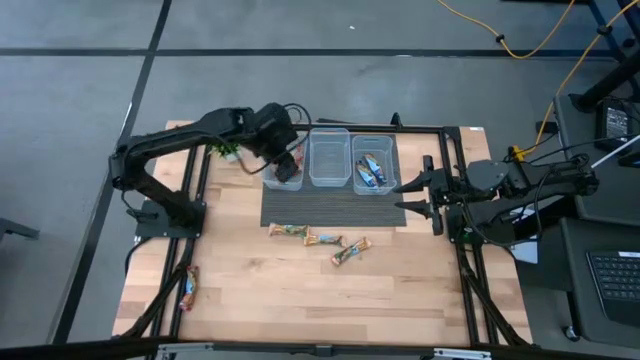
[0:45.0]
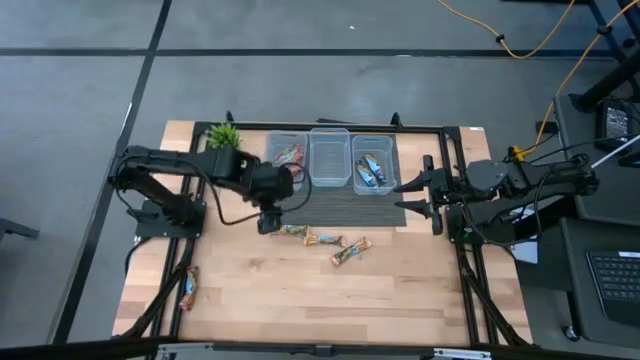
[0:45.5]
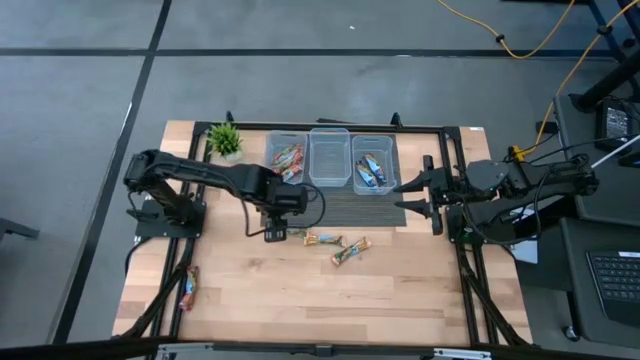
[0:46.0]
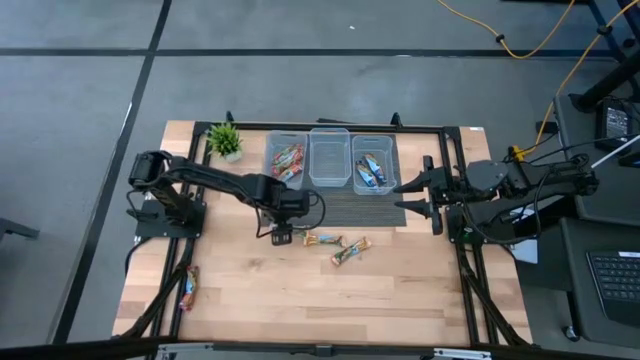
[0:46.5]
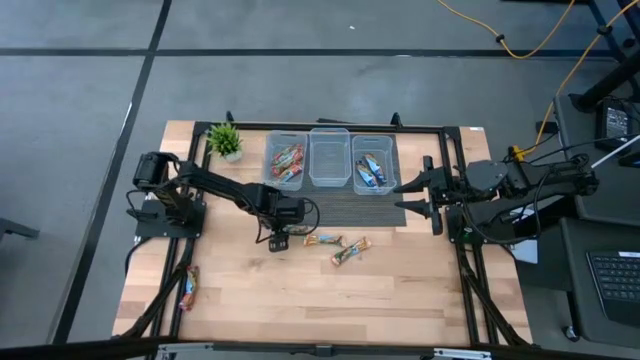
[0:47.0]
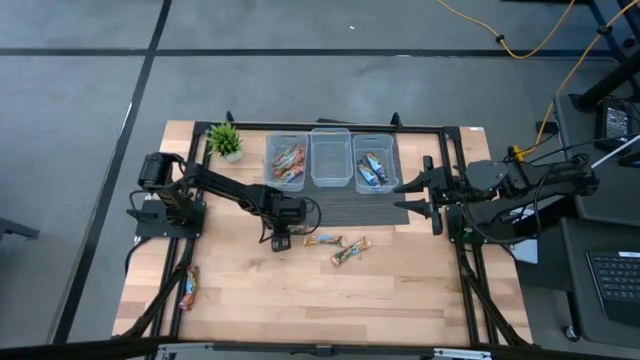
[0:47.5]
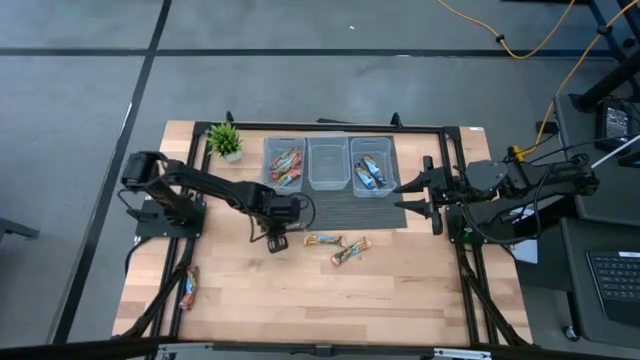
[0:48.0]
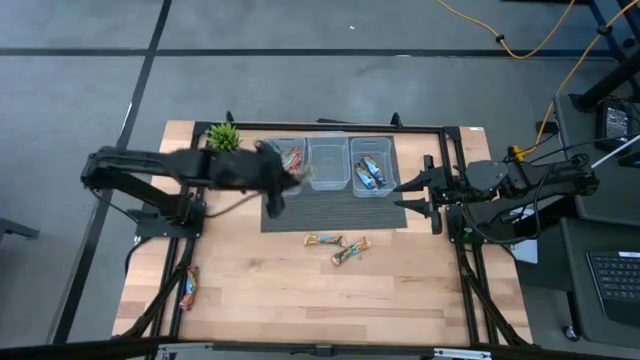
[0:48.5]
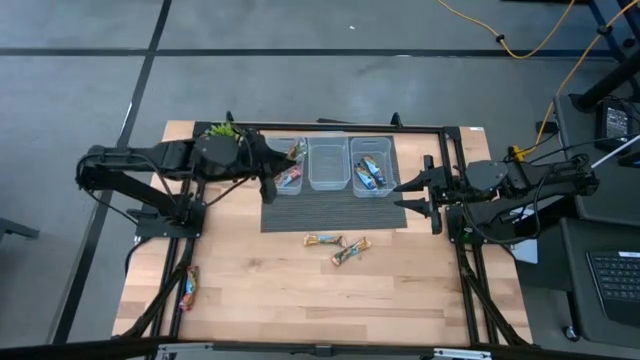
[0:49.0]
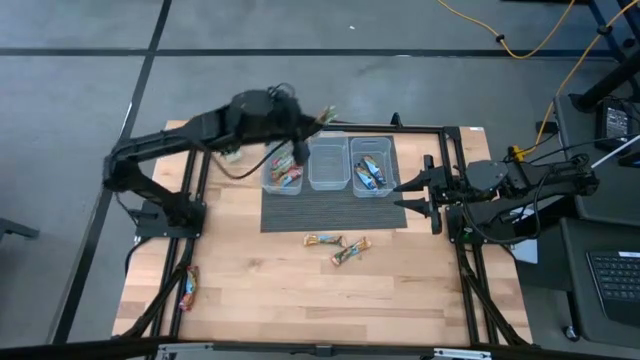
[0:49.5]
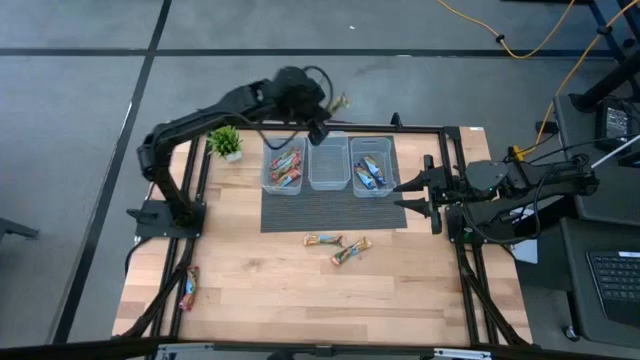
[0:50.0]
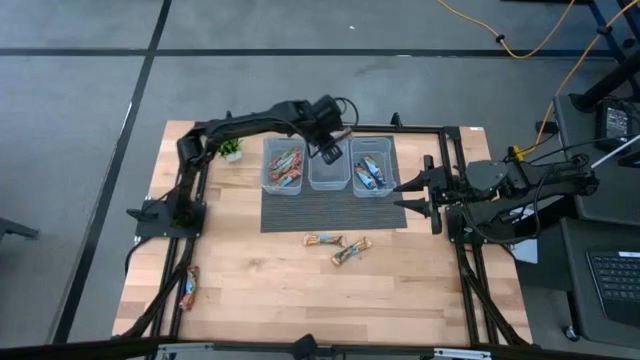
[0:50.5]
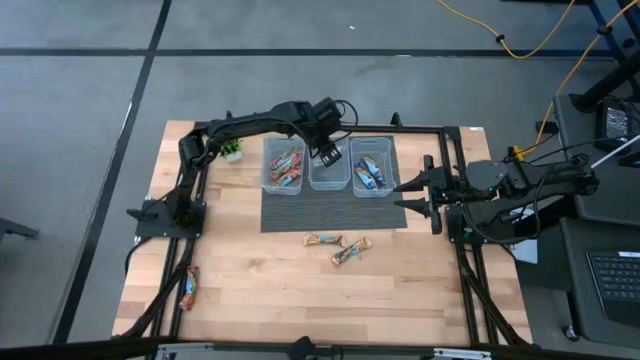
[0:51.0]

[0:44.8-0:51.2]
Task: Pick and place Granola Bars by type
Put the left orange into the middle transparent bin

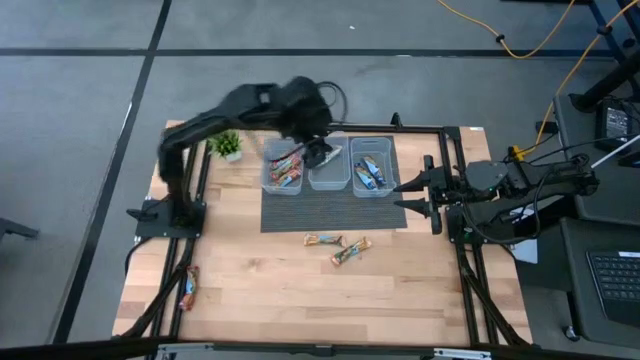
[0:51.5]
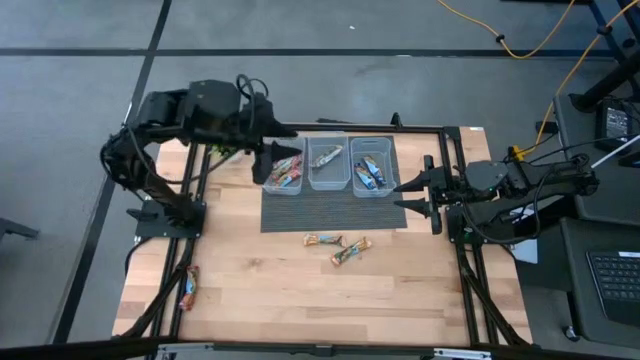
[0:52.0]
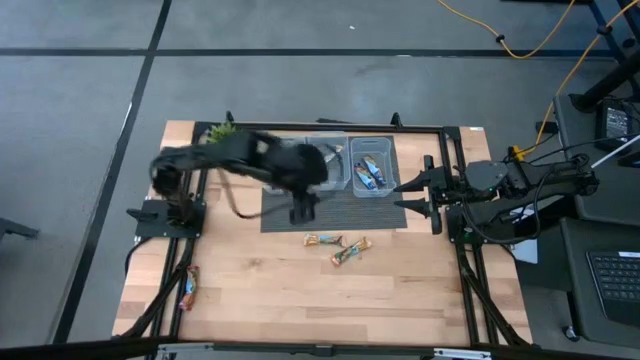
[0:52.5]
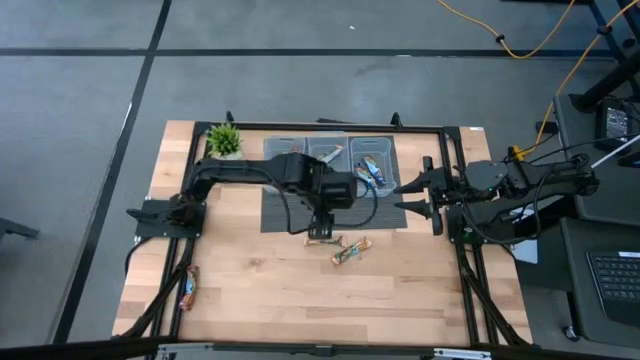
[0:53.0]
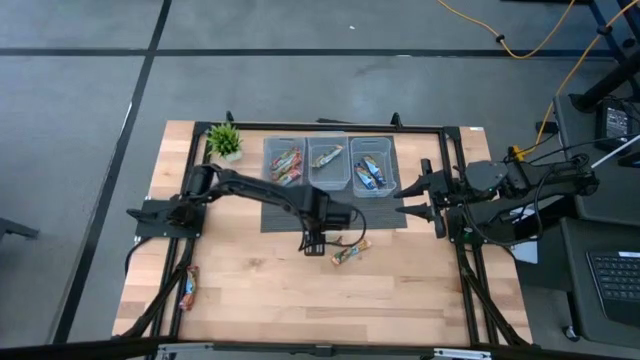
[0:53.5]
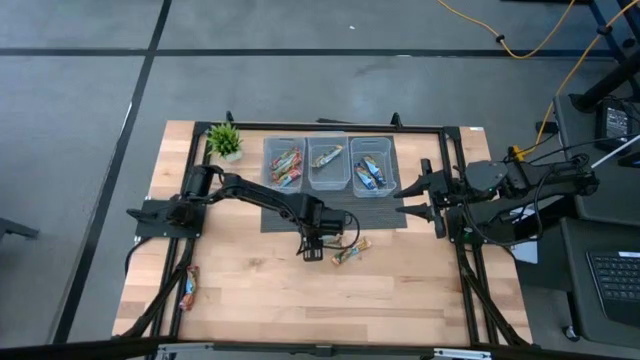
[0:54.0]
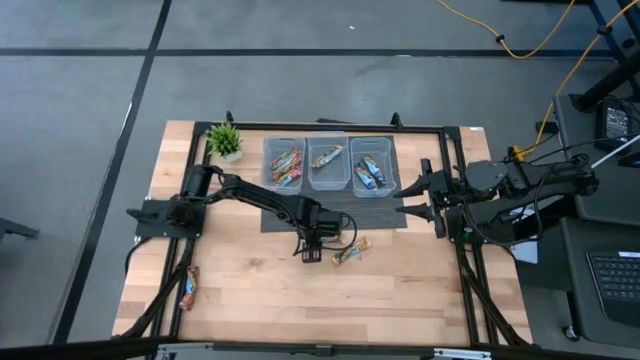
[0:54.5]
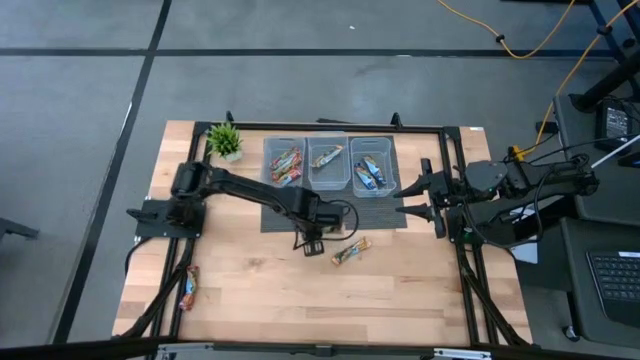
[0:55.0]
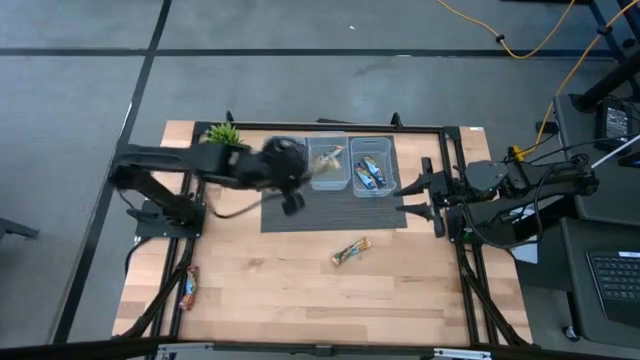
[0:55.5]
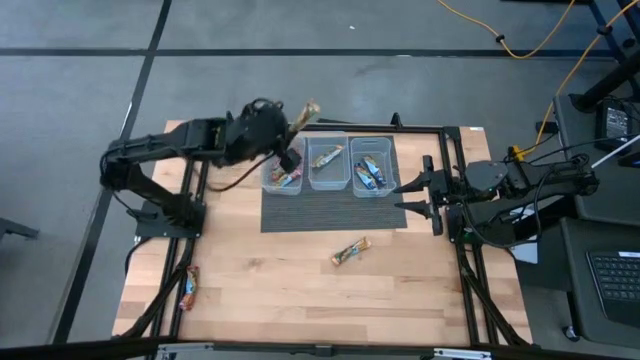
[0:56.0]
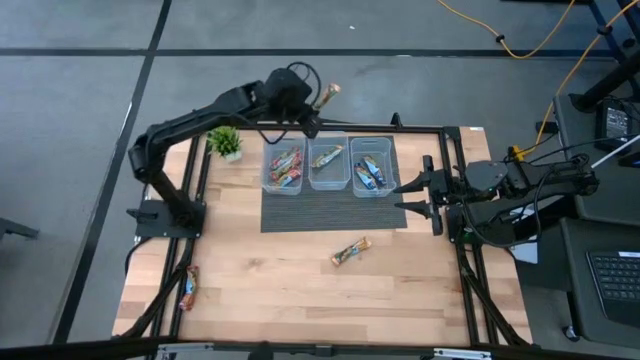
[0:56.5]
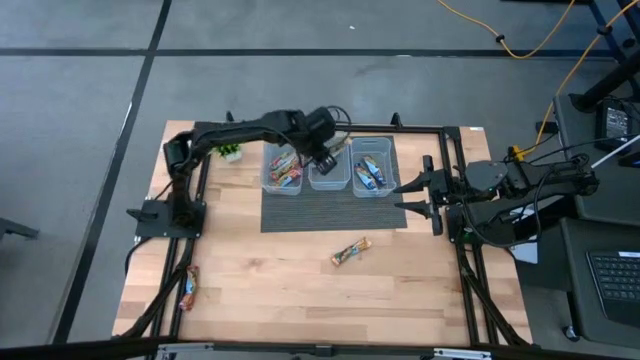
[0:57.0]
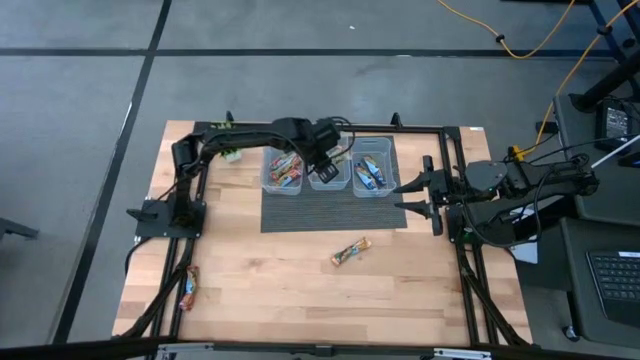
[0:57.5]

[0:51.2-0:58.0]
Put the center snack bar into the middle transparent bin

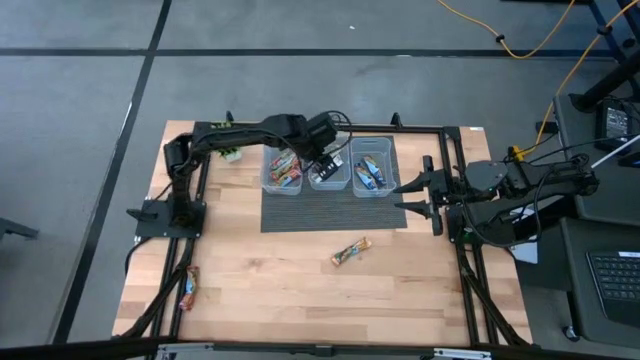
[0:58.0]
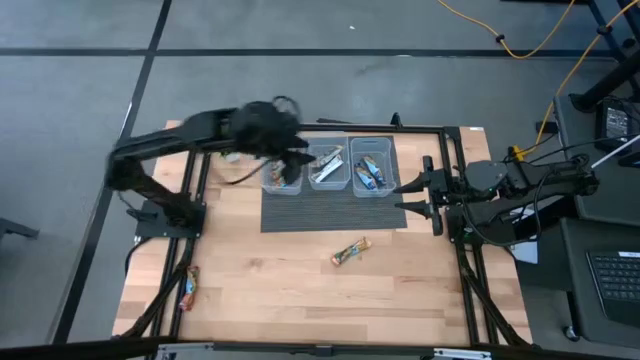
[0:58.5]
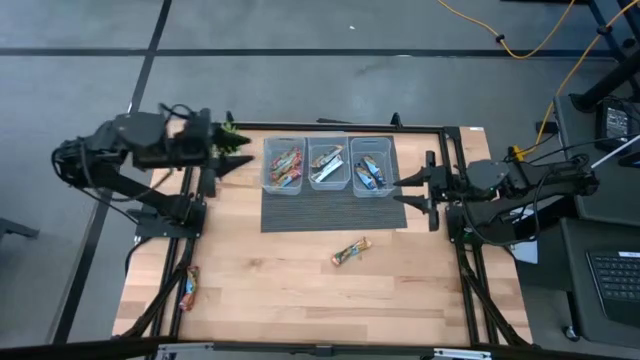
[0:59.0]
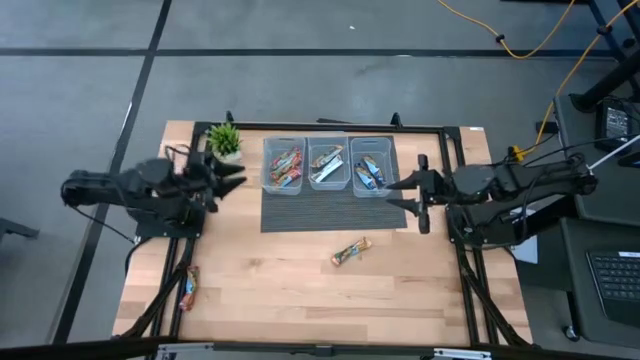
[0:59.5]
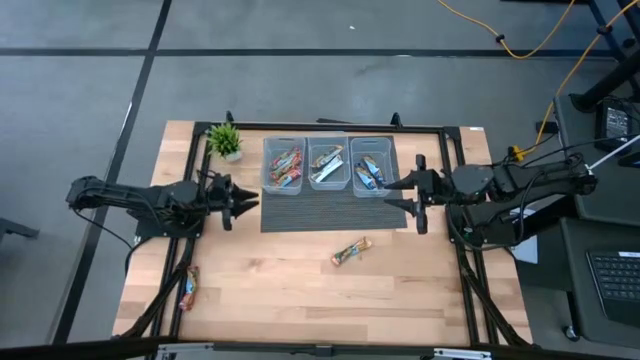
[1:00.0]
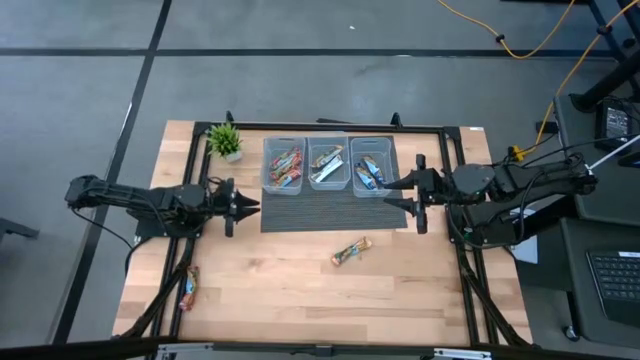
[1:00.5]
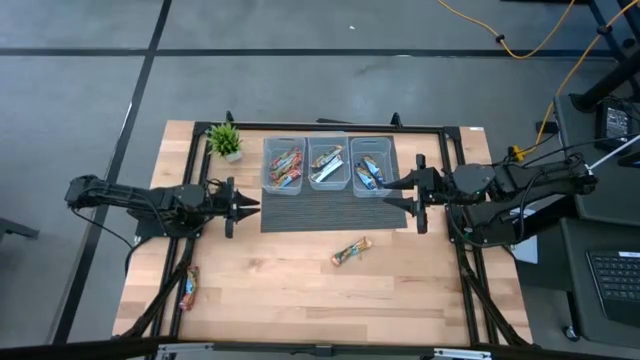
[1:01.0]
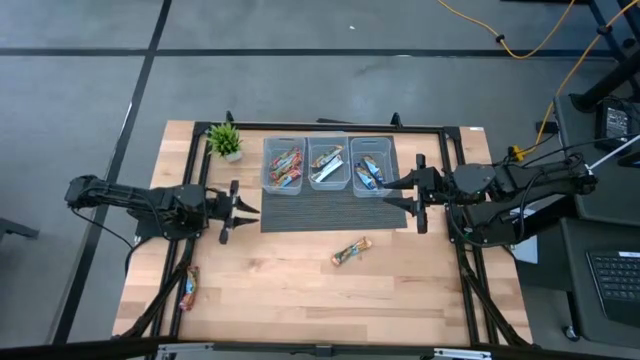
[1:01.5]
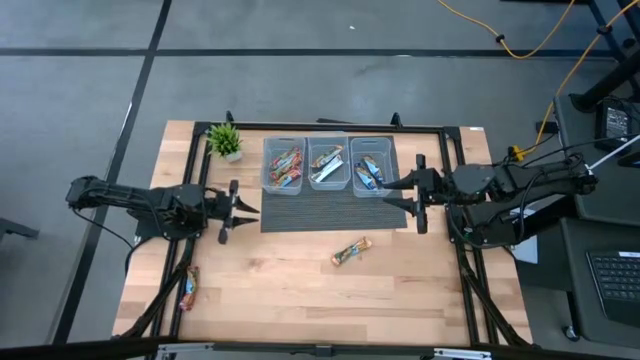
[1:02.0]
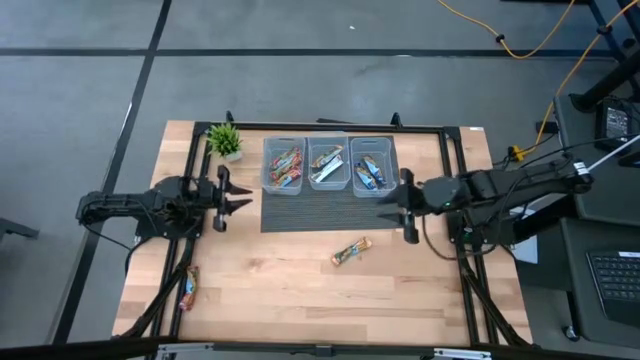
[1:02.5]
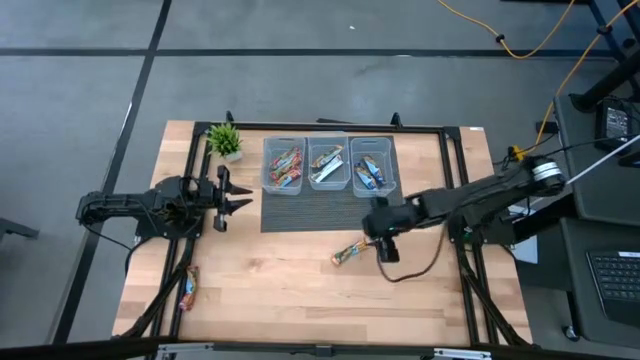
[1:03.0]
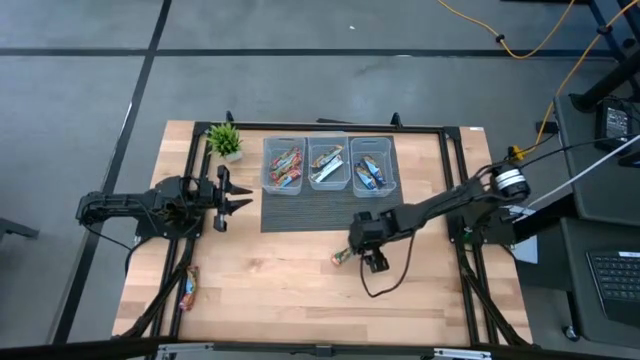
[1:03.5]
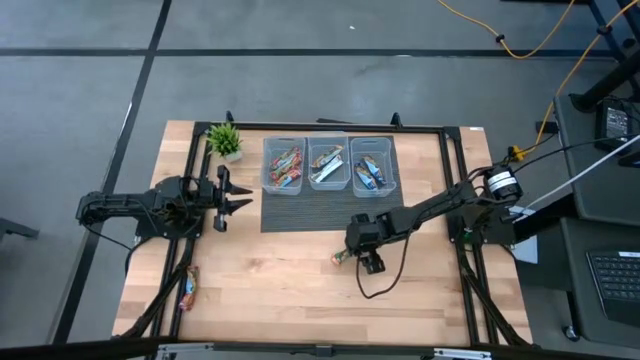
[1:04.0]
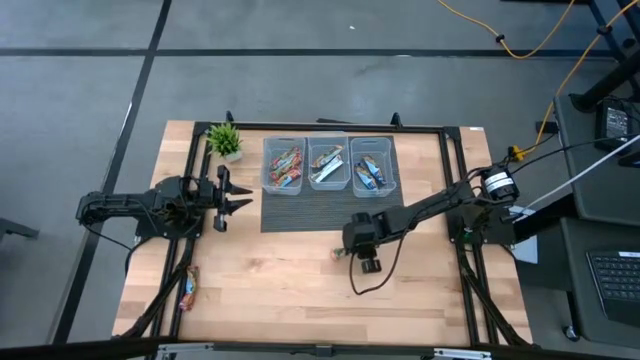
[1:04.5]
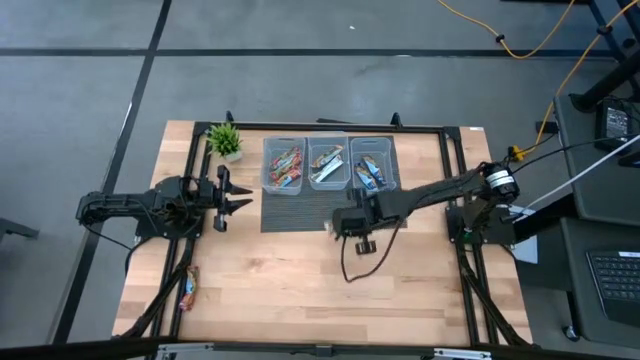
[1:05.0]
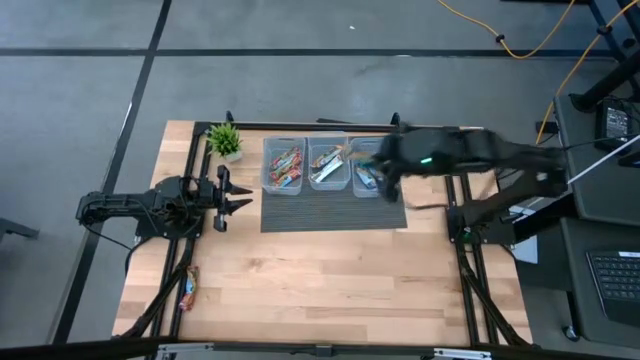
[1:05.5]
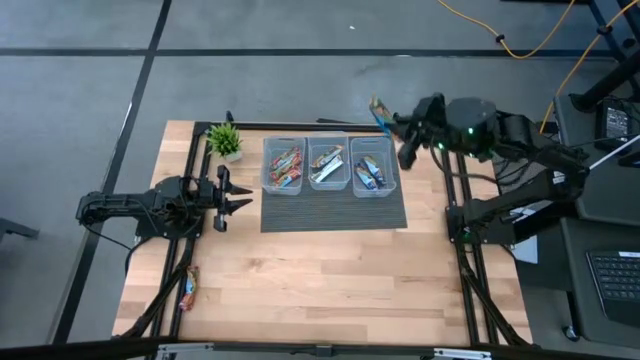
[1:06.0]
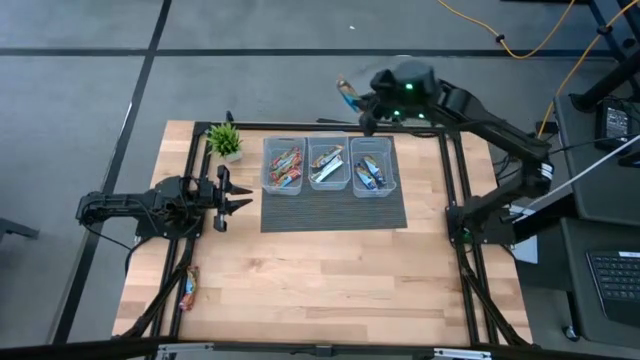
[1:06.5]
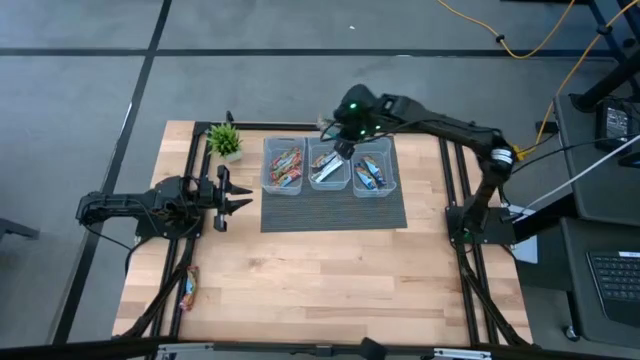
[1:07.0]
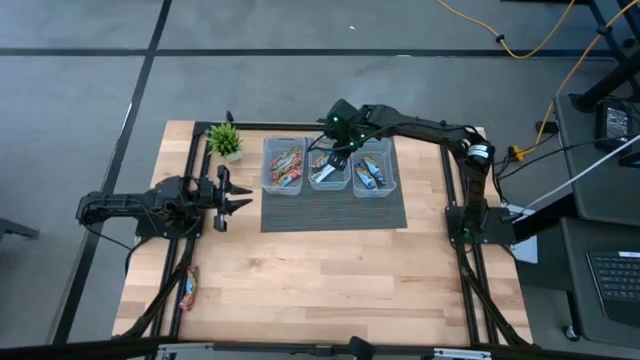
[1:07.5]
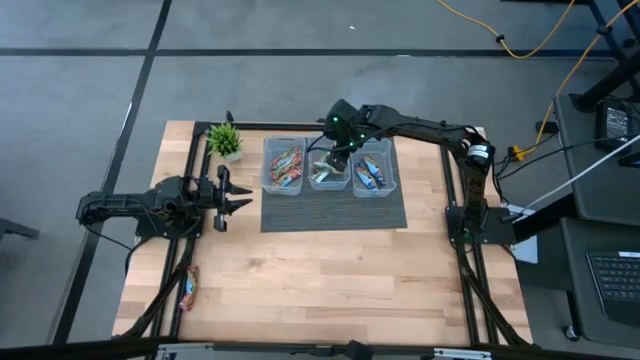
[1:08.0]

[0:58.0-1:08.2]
Put the orange snack bar into the middle transparent bin
